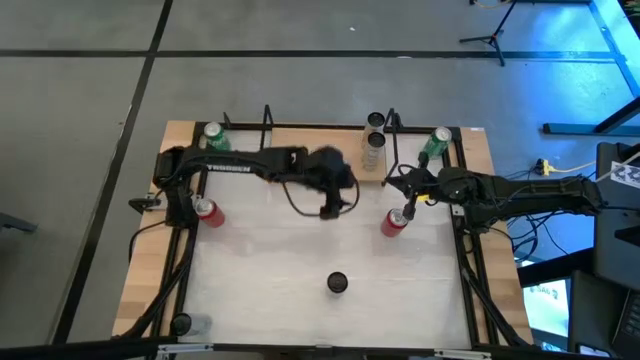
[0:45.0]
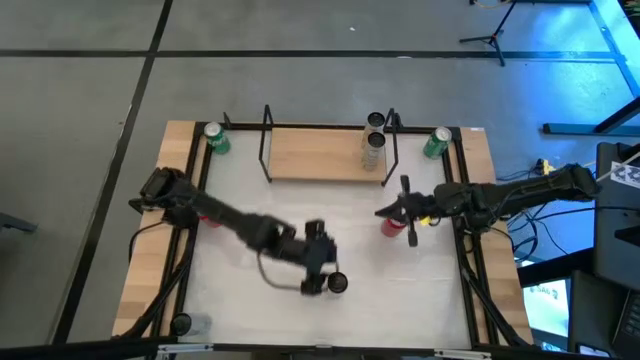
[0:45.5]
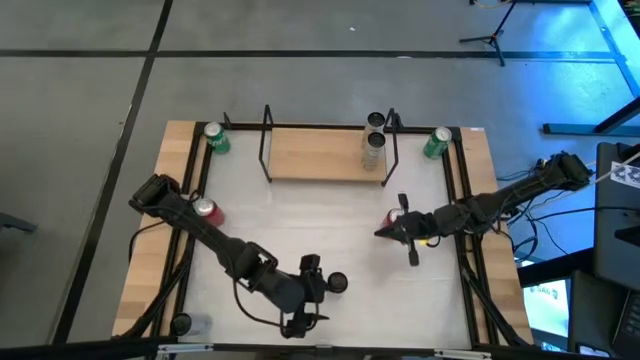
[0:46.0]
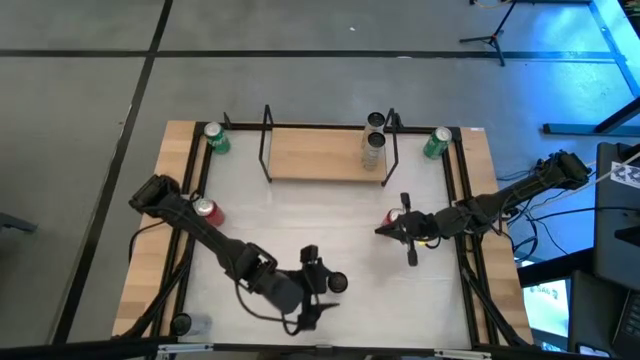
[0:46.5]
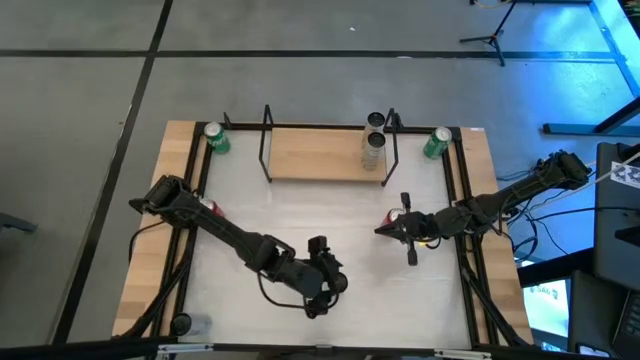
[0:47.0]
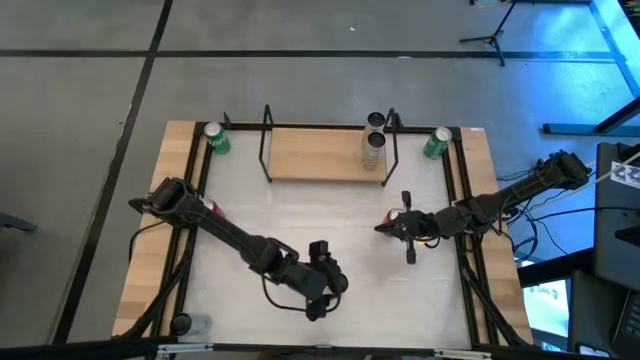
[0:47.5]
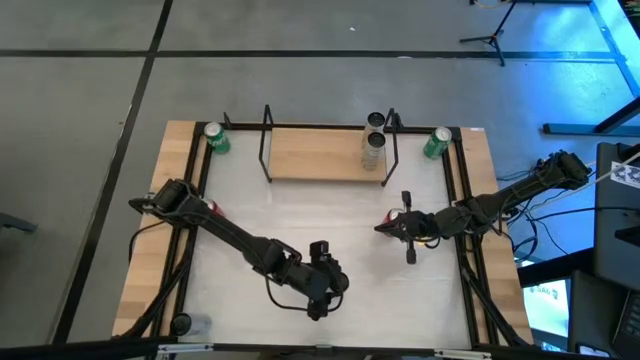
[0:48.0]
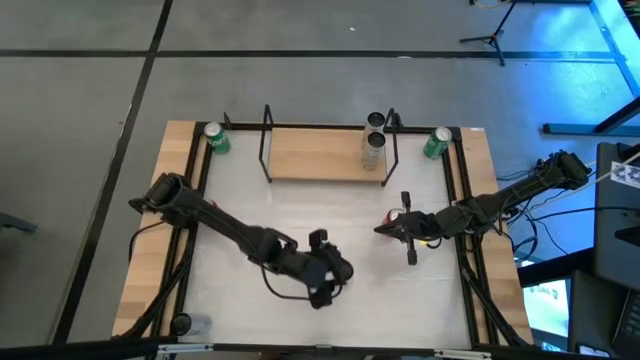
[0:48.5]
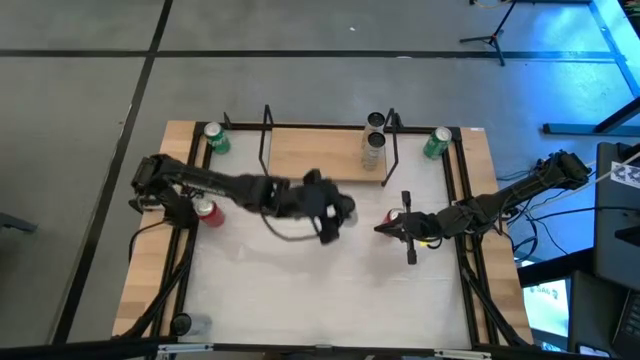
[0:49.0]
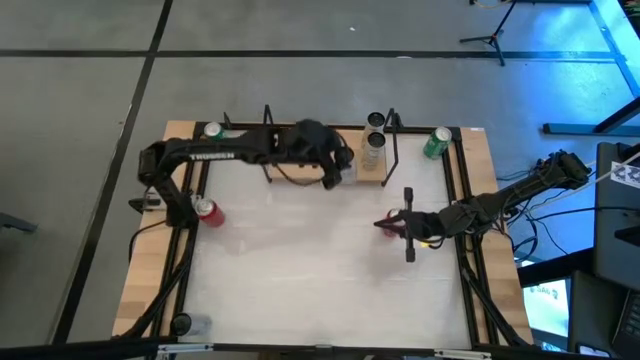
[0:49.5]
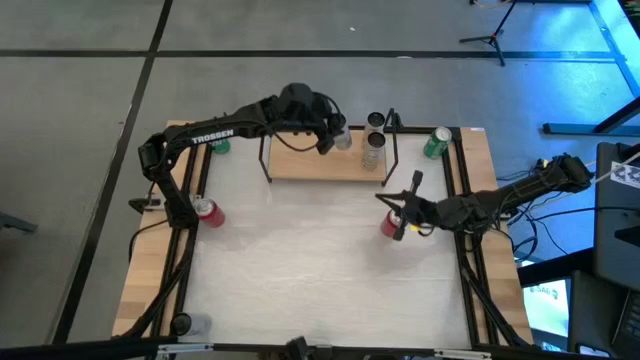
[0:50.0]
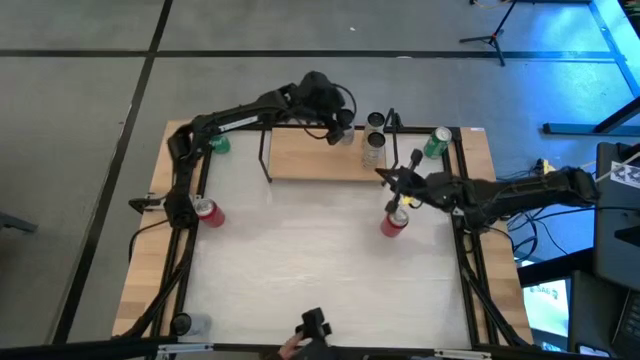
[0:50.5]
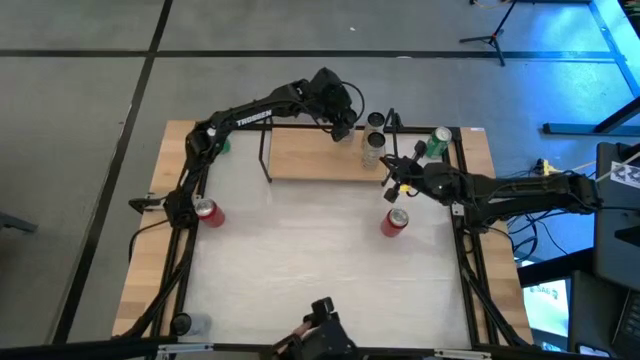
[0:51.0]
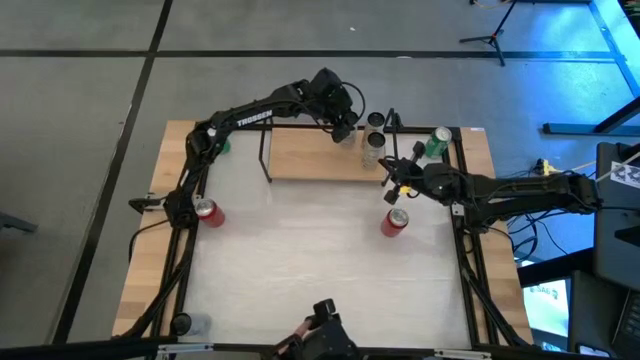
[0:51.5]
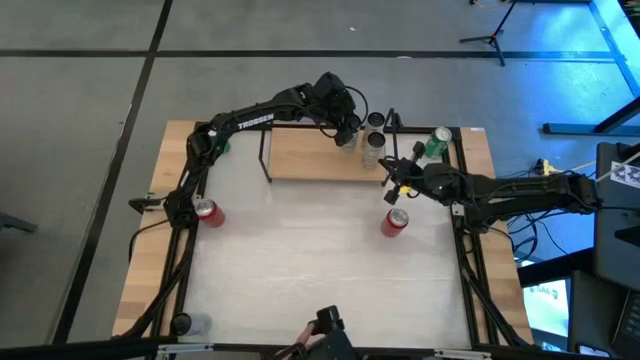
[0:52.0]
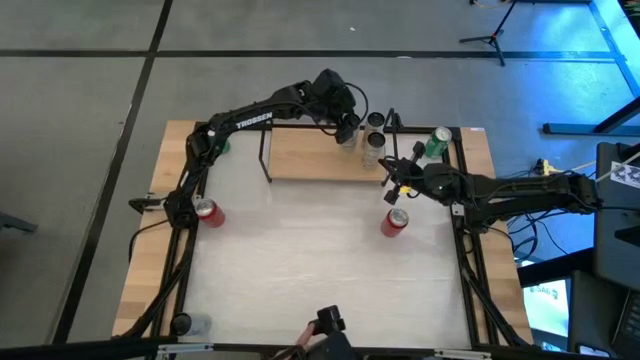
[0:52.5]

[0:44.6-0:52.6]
Task: Place canned beverage on shelf
Put the right white and blue soda can on the shelf

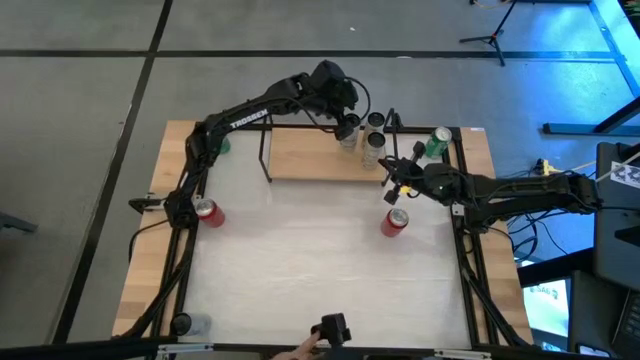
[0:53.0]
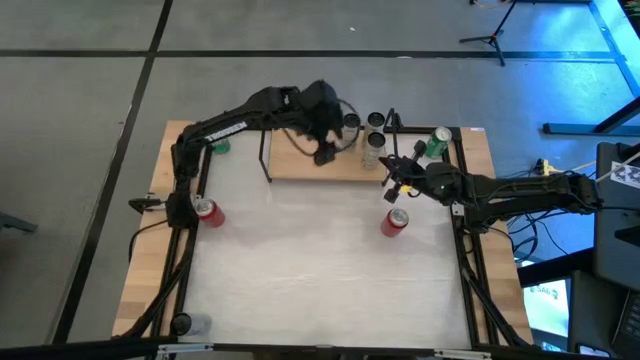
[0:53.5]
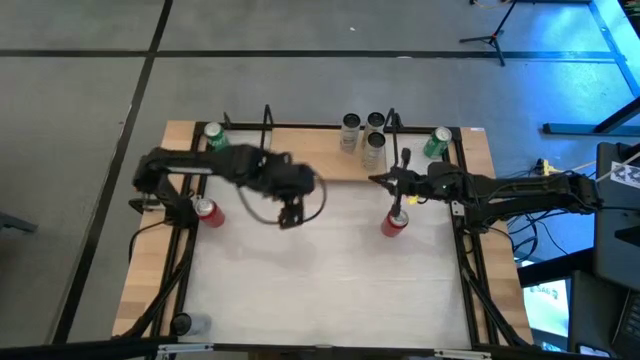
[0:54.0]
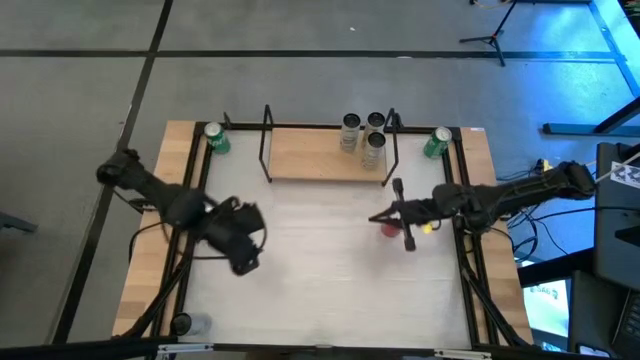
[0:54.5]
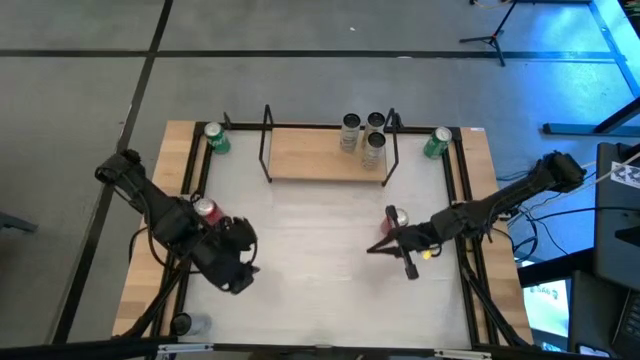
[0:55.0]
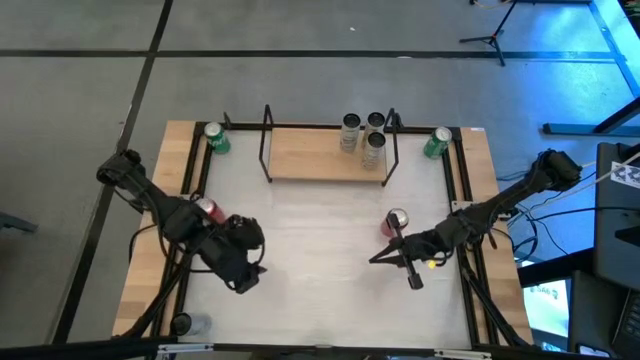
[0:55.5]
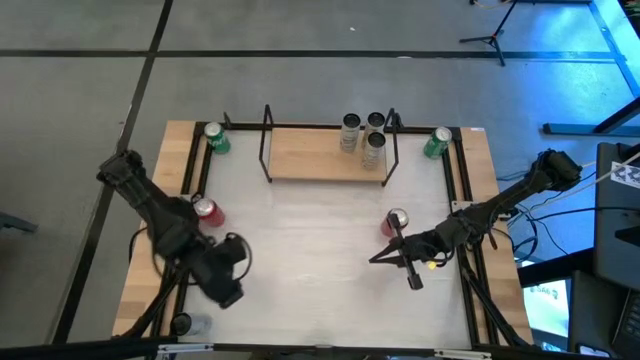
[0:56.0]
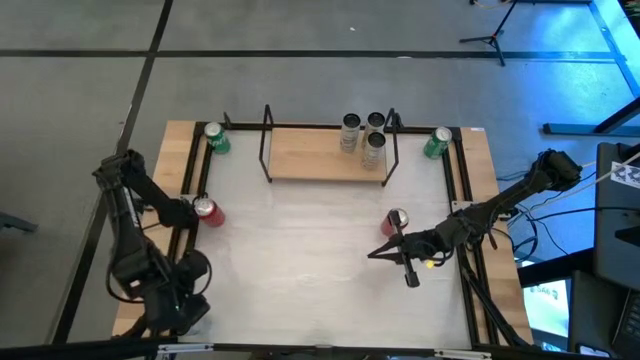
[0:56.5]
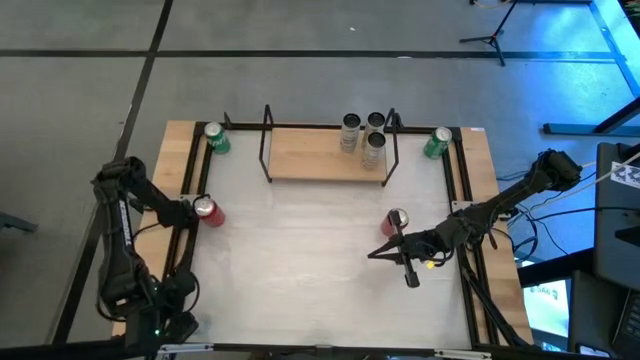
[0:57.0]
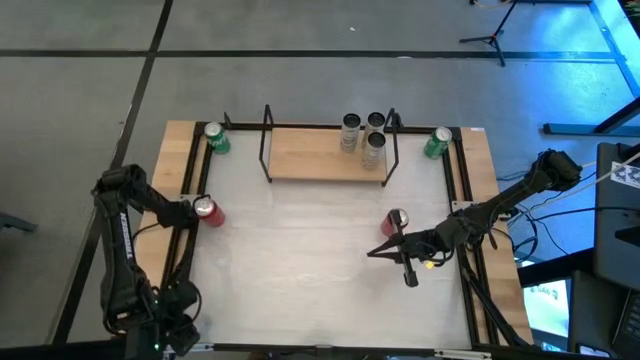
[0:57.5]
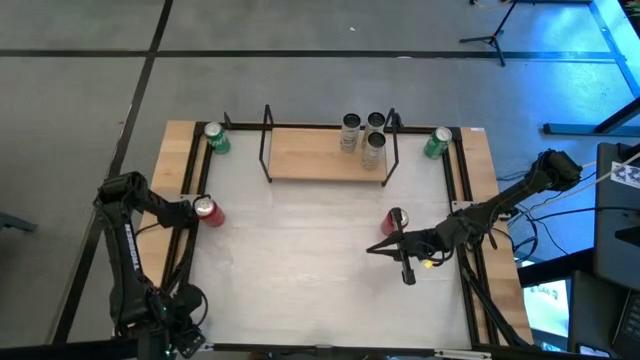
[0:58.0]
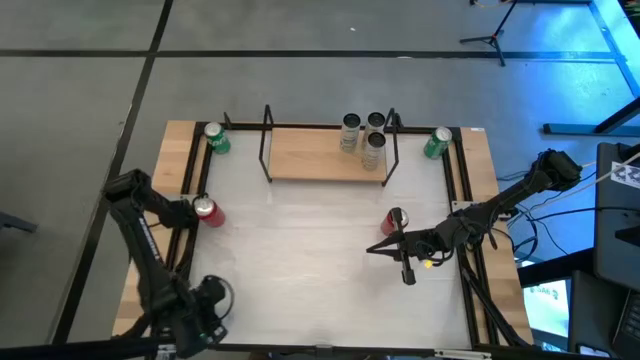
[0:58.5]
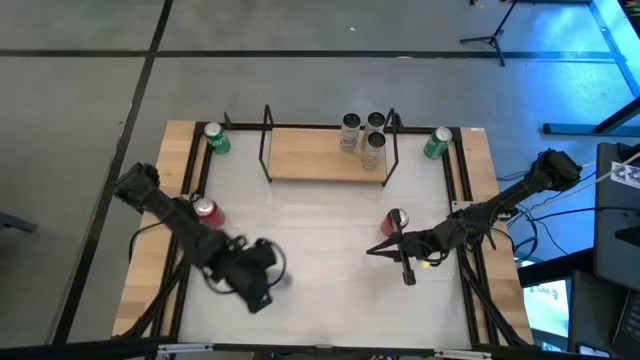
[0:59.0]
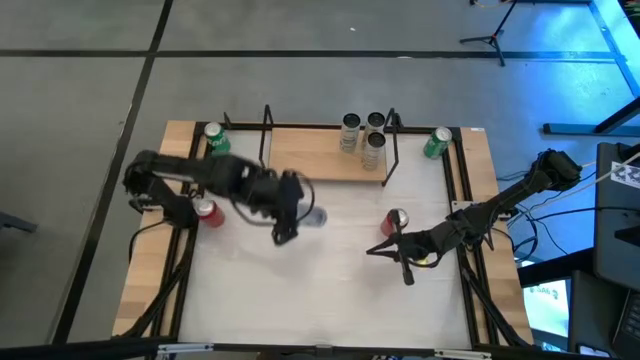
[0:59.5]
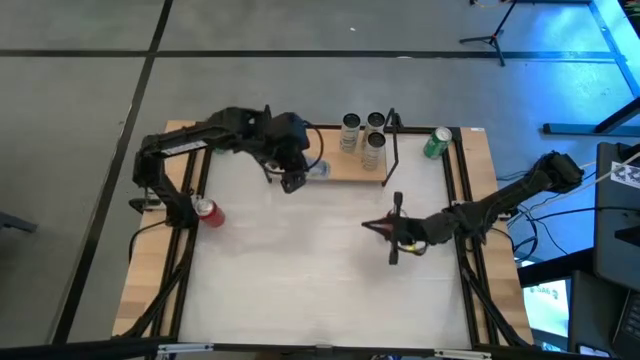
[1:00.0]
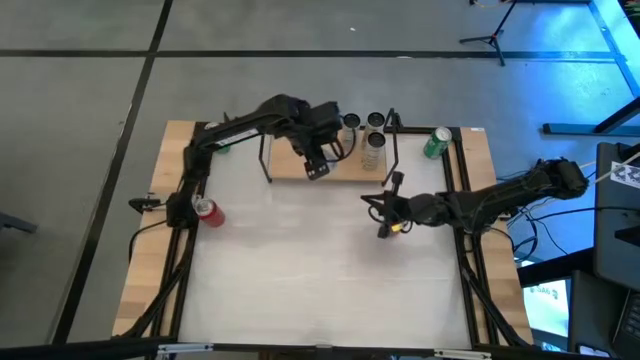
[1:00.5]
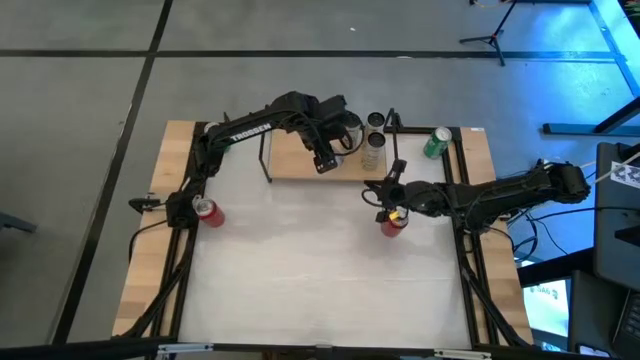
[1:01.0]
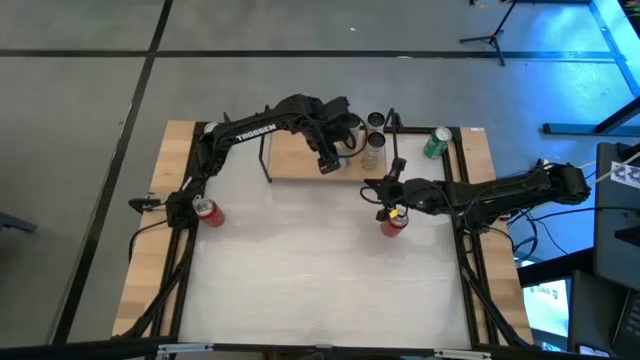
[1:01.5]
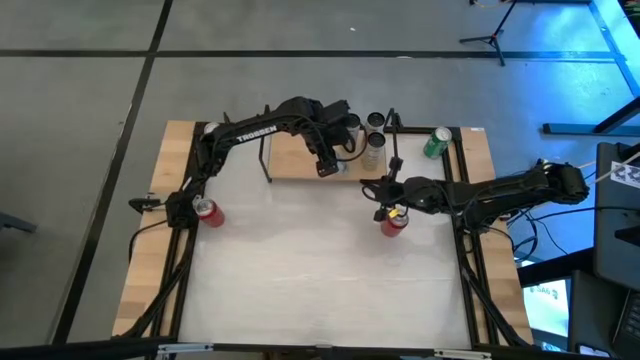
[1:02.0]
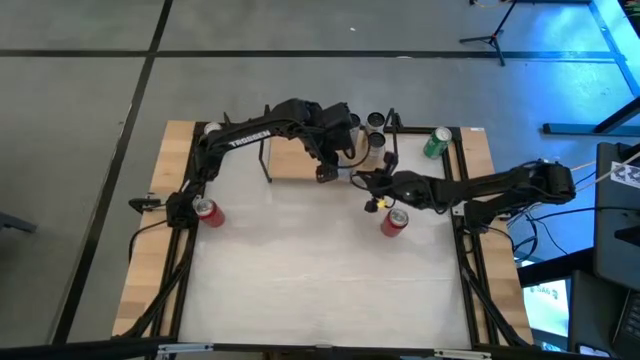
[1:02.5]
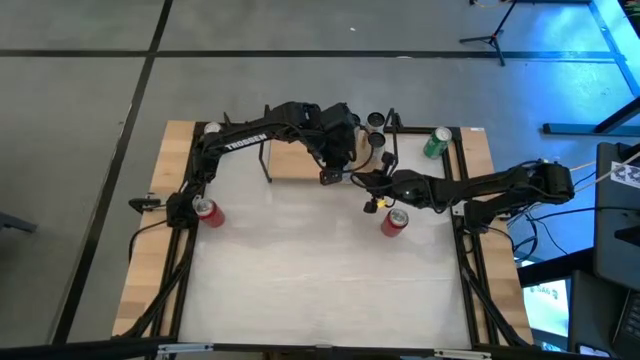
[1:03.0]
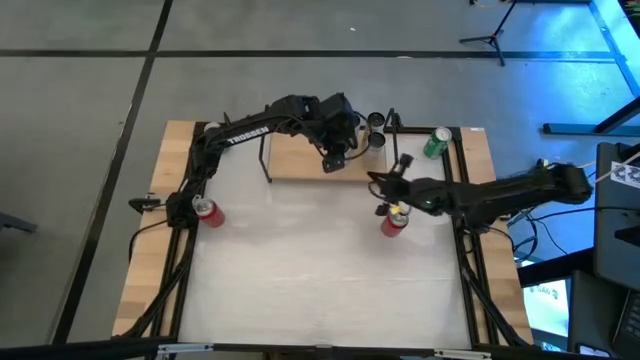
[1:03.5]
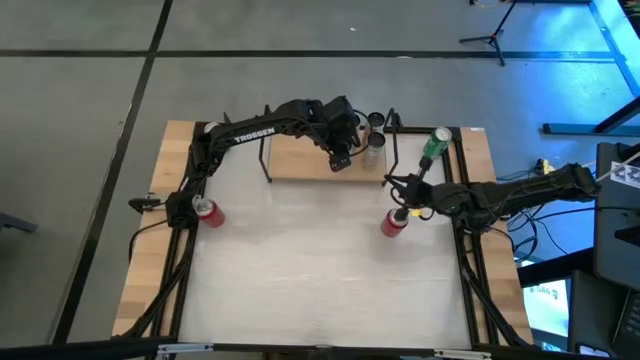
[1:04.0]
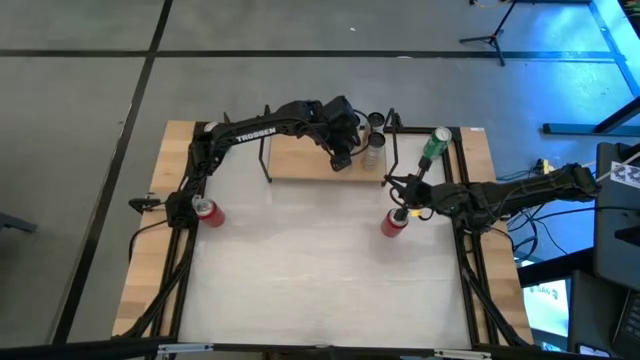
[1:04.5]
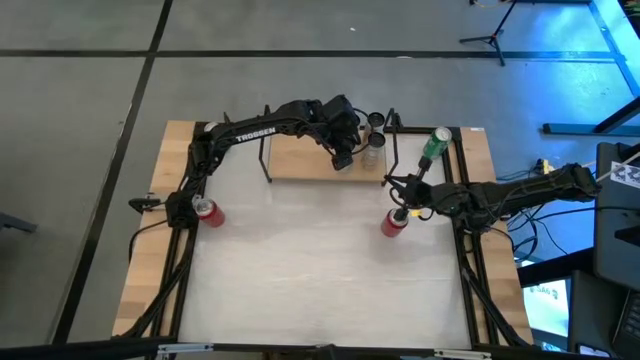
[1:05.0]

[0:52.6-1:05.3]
Put the white and blue soda can on the shelf
